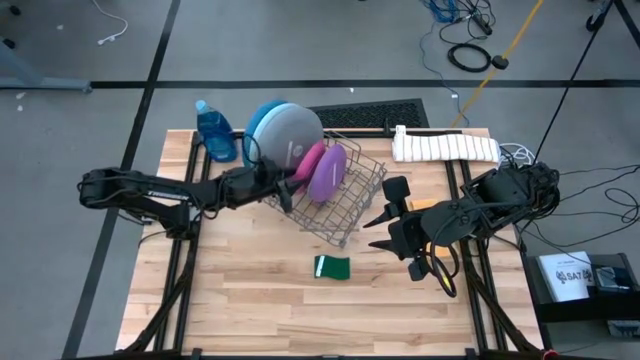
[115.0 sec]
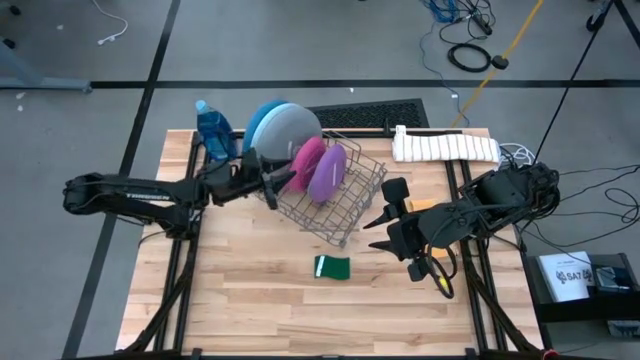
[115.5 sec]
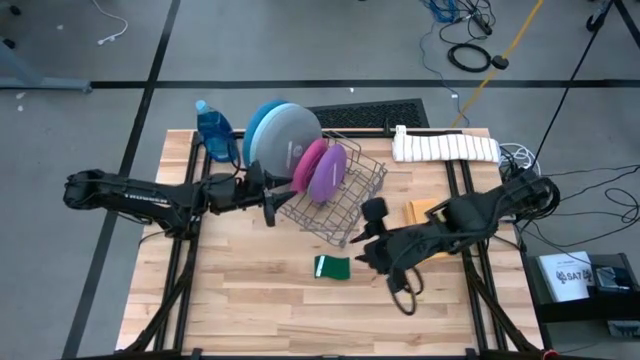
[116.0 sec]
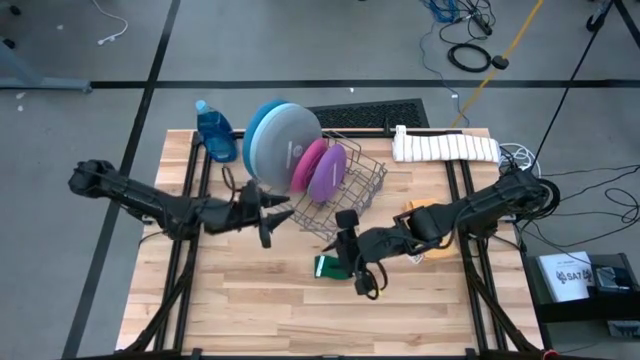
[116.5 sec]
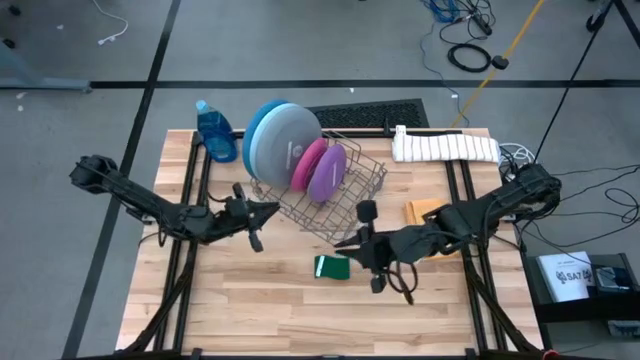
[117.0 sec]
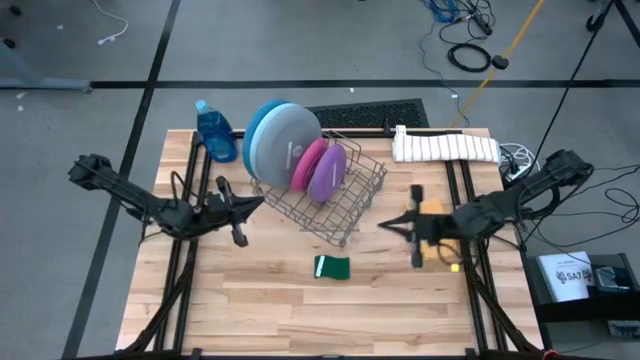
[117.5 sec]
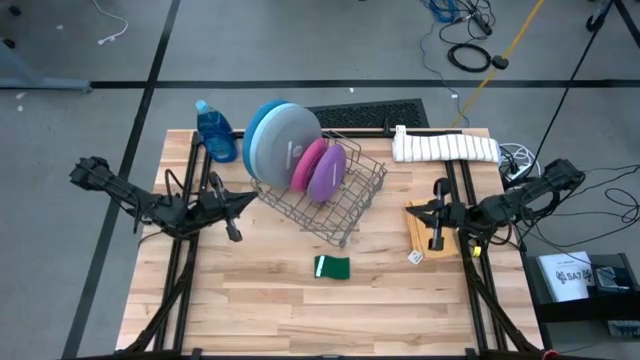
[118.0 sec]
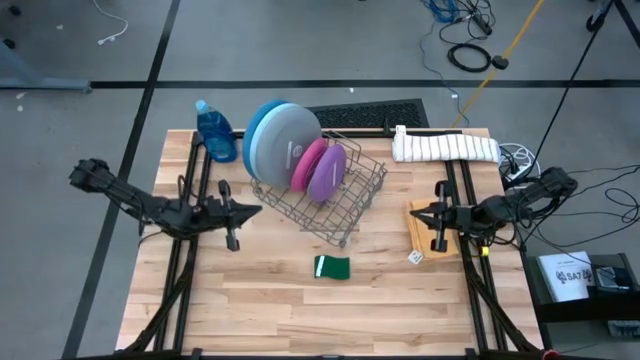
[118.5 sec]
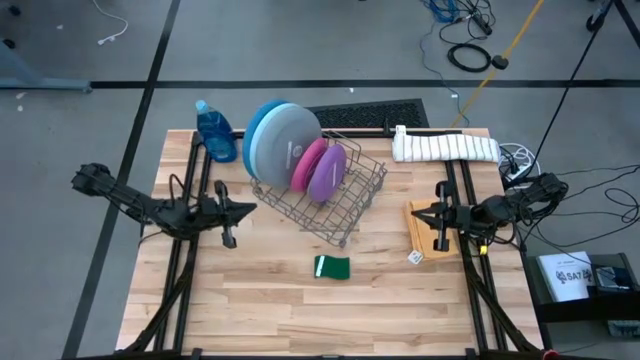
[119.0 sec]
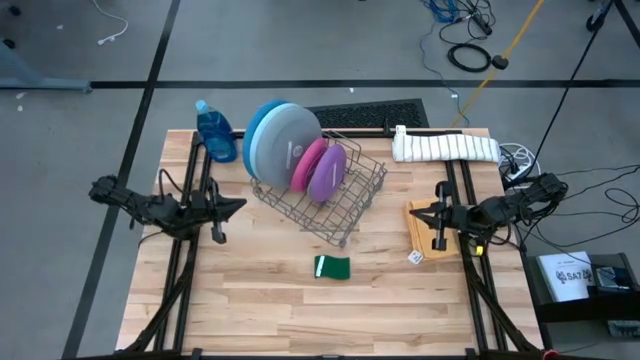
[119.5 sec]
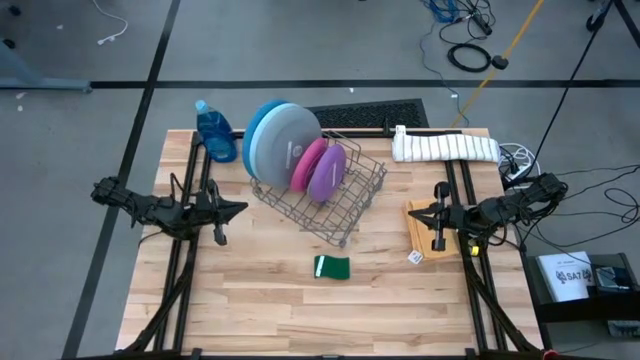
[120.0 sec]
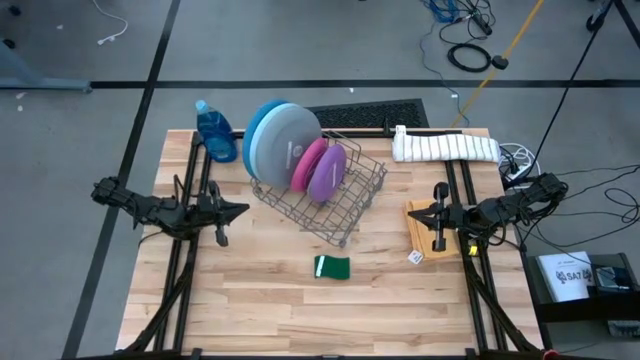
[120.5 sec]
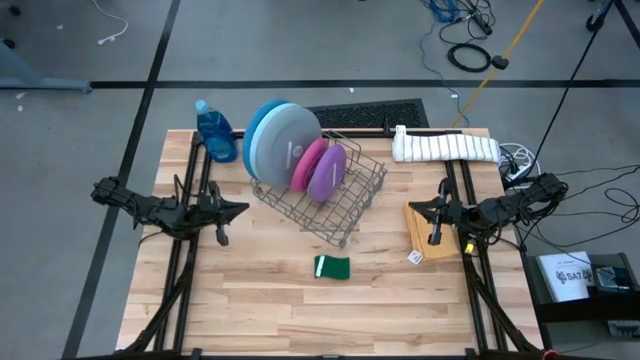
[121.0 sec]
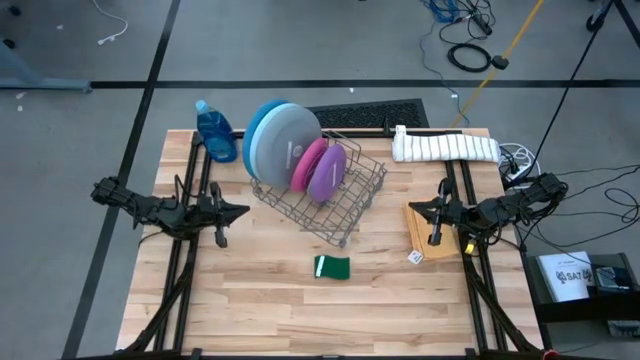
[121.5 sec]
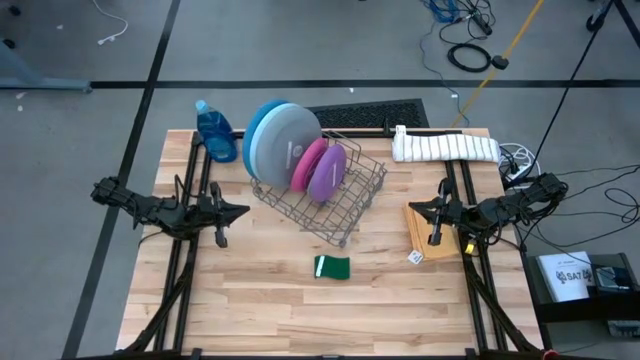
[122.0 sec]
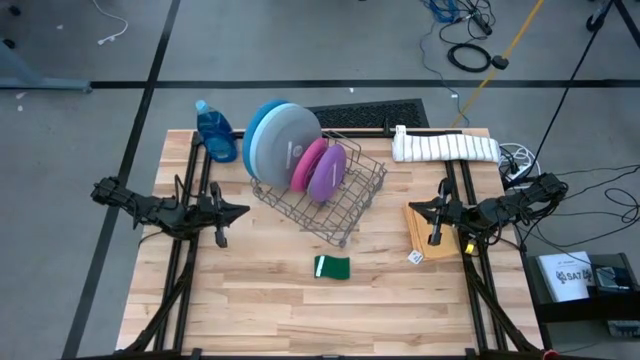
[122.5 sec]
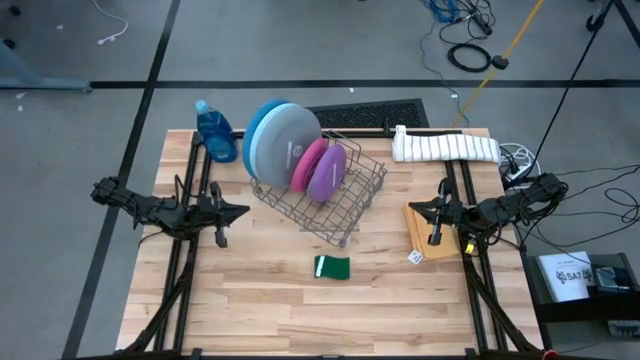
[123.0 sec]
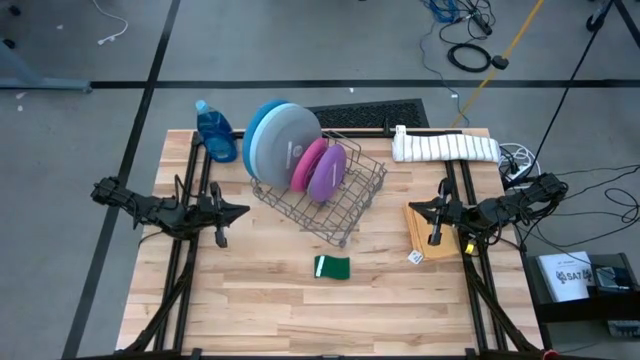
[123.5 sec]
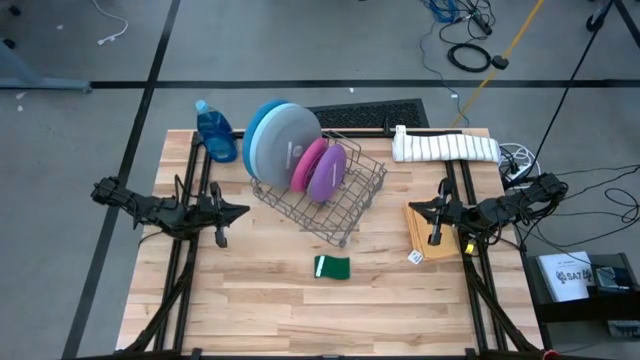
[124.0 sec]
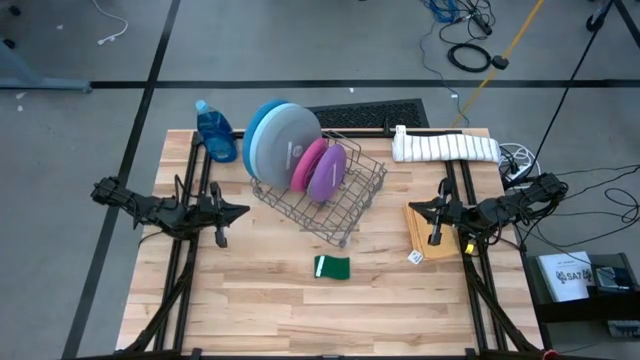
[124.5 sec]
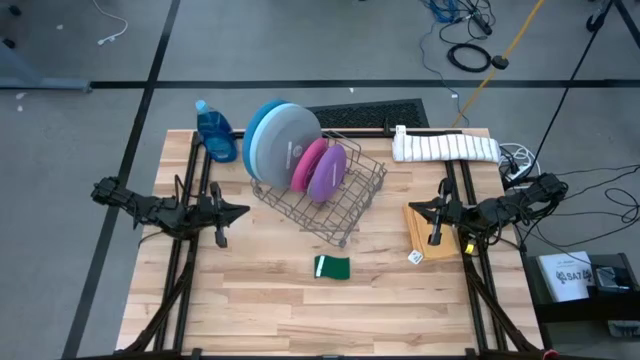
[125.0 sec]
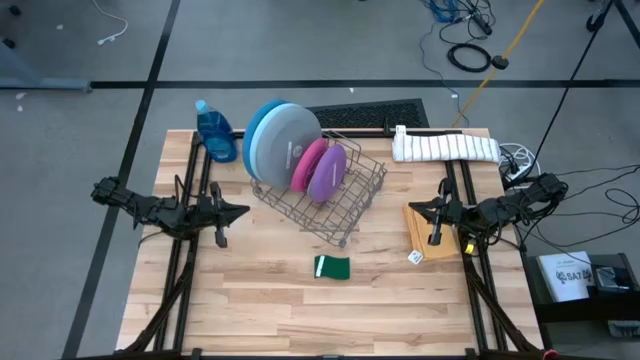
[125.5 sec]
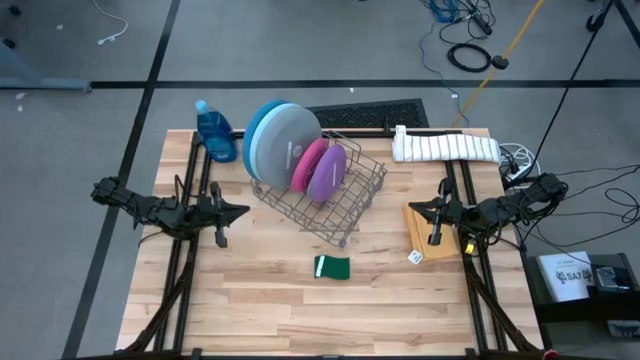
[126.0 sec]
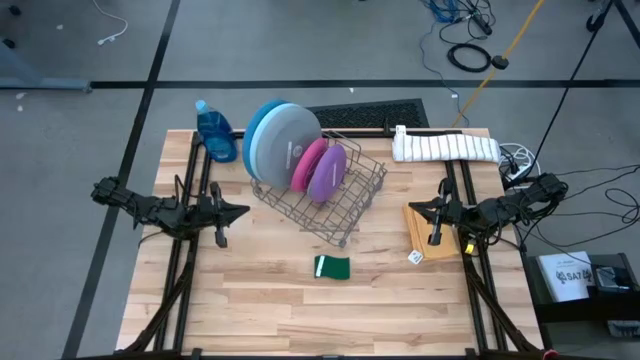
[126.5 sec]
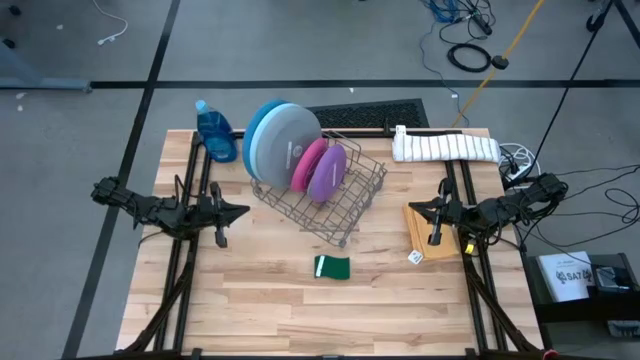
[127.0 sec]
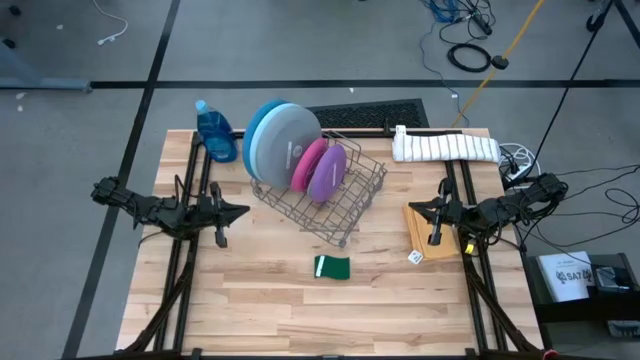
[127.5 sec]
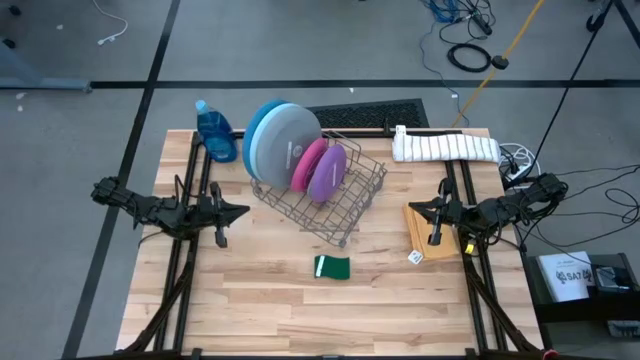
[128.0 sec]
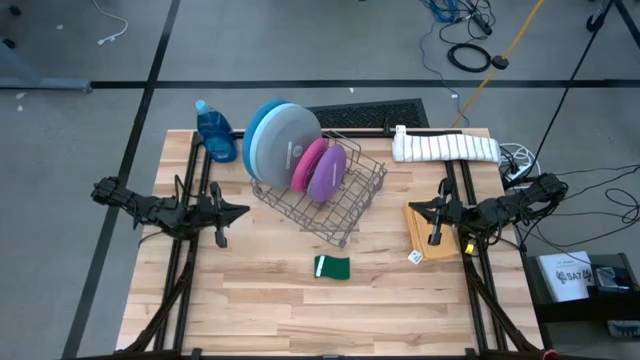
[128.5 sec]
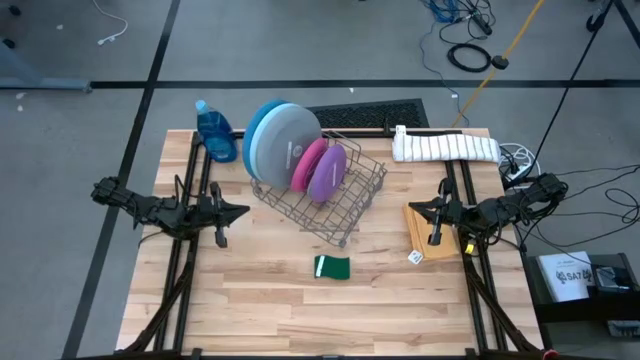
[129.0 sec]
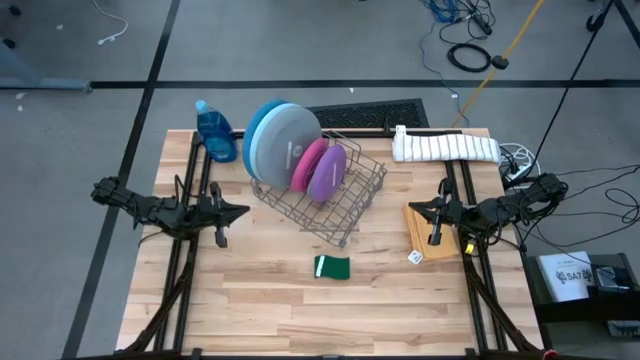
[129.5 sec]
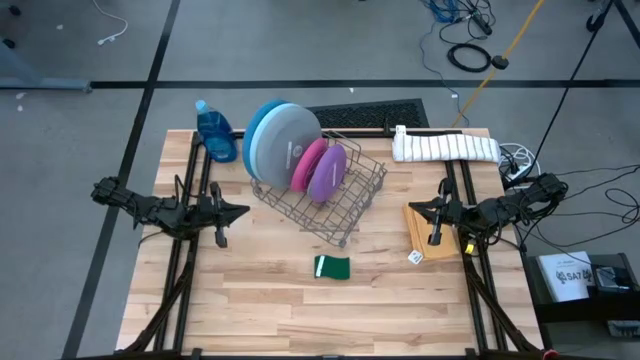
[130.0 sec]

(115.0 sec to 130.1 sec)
Task: Sort dishes
Return to Home Position

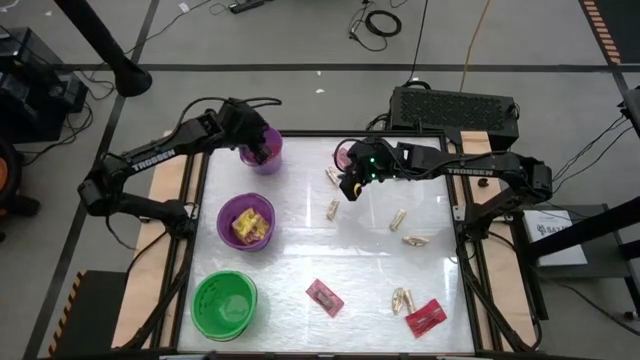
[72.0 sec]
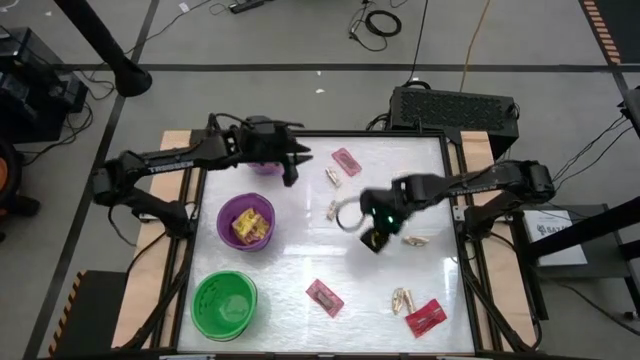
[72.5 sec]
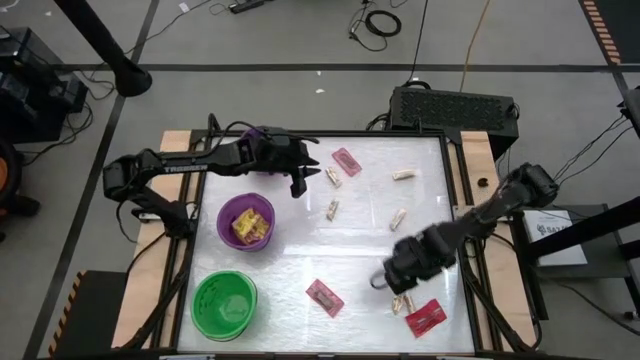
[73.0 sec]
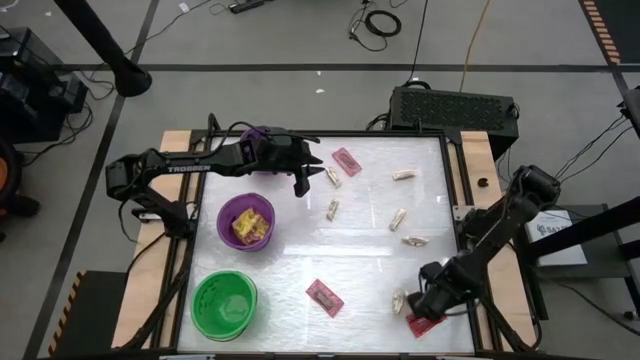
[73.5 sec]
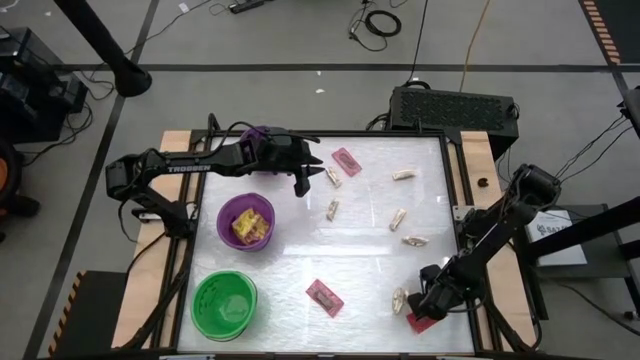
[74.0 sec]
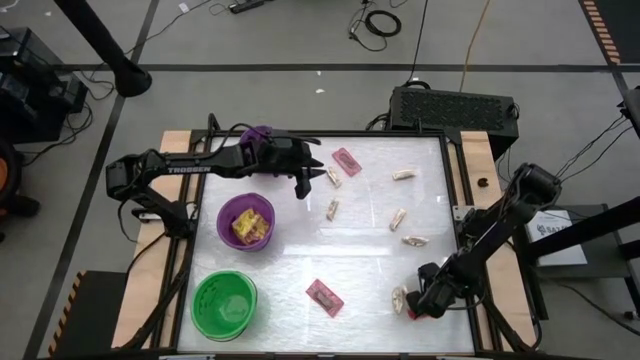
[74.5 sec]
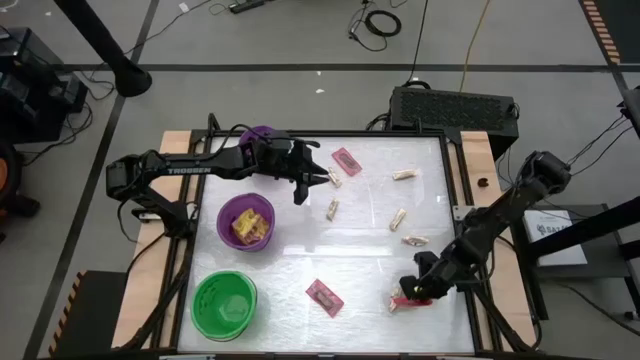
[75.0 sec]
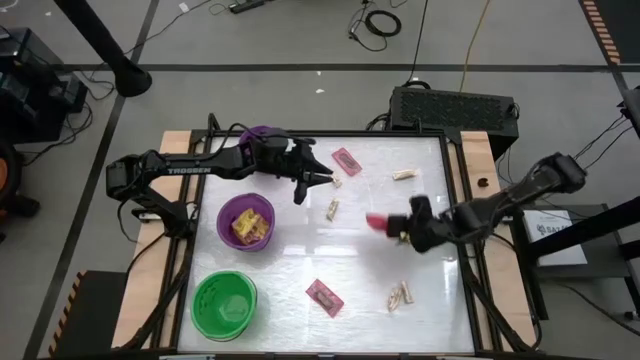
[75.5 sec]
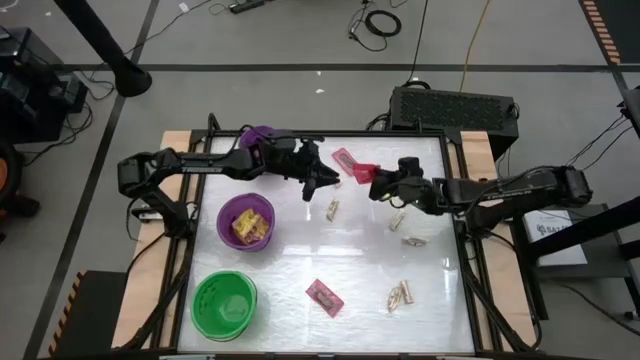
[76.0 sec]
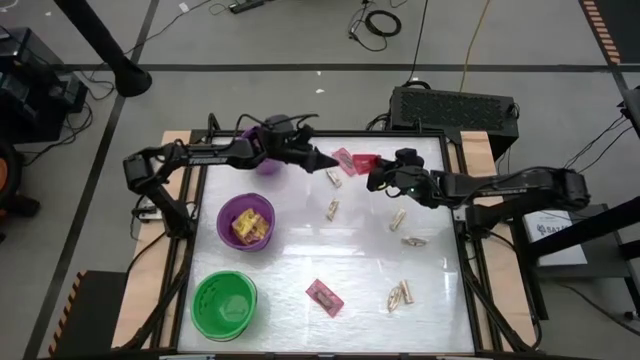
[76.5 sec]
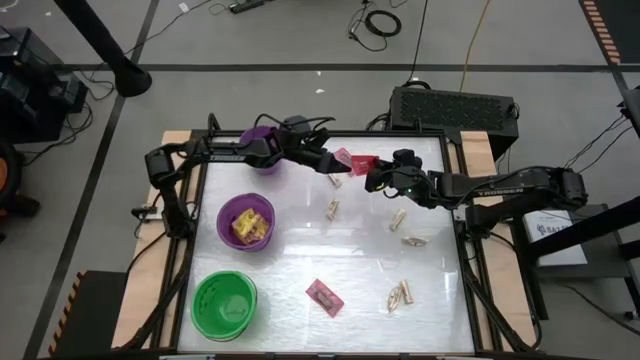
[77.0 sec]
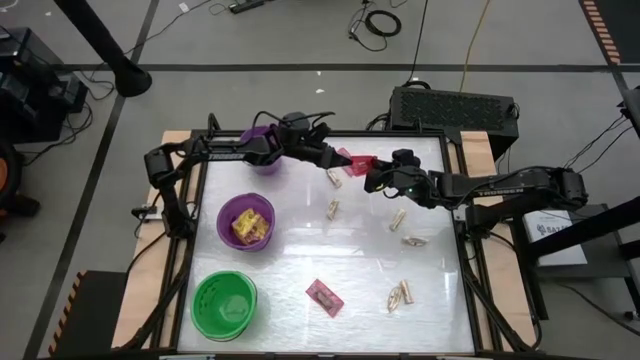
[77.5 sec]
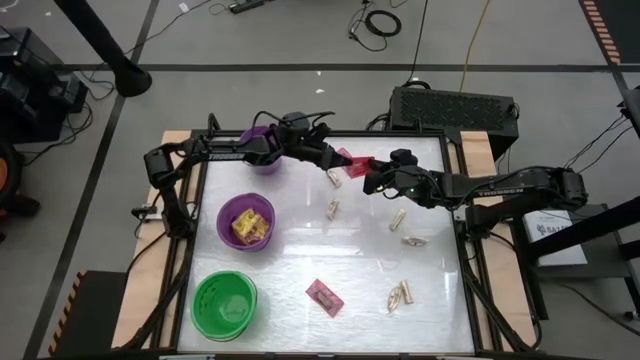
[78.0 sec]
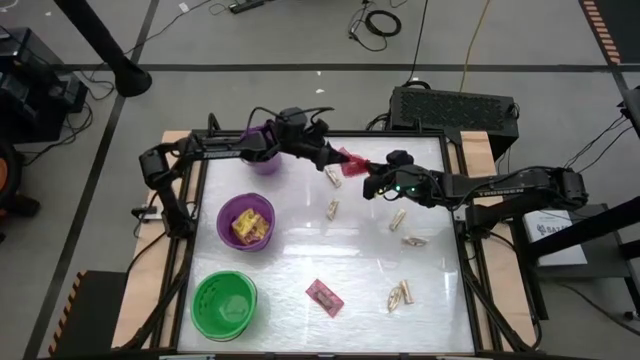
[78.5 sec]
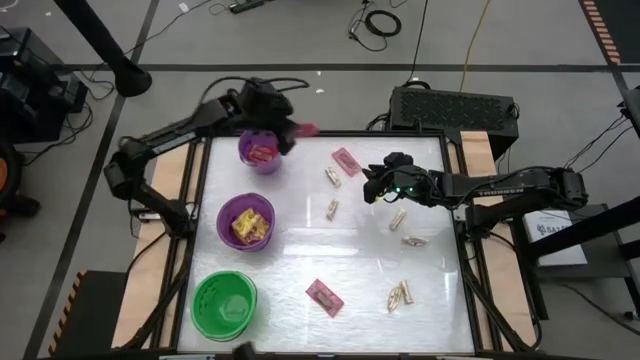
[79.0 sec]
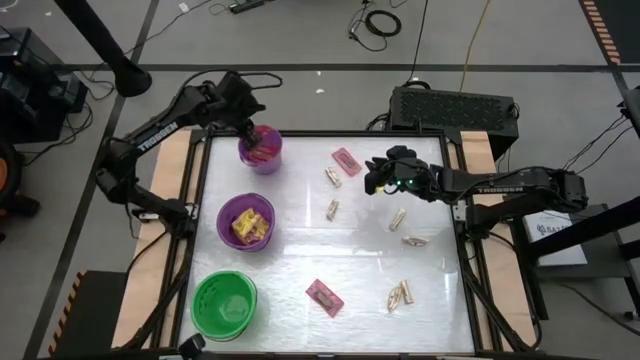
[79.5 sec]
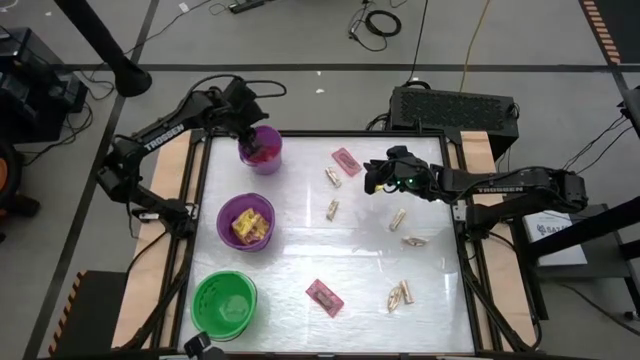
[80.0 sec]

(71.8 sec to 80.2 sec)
Task: Sort candy by brand, put in halloween buckets
Put the red candy into the top purple bucket
